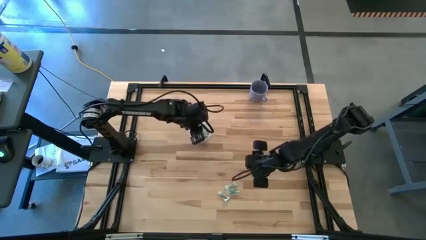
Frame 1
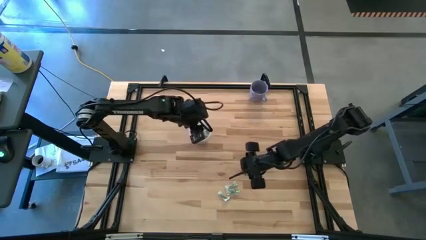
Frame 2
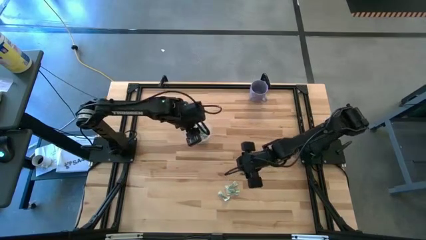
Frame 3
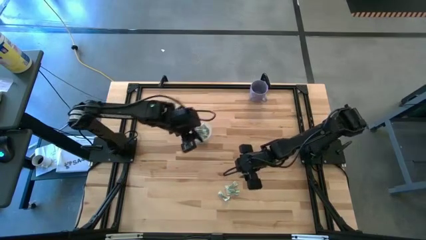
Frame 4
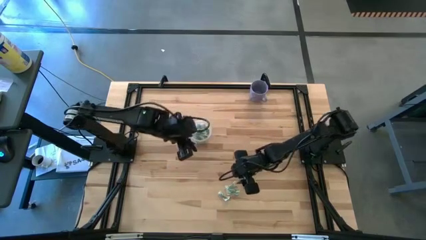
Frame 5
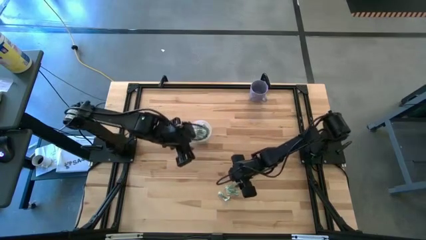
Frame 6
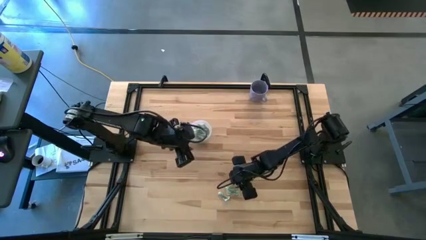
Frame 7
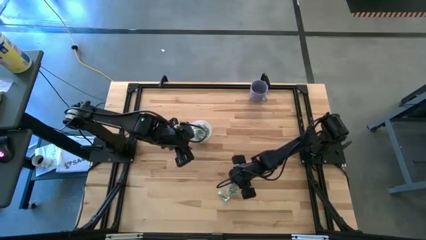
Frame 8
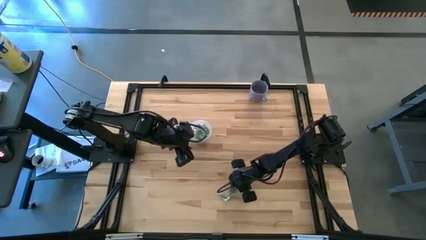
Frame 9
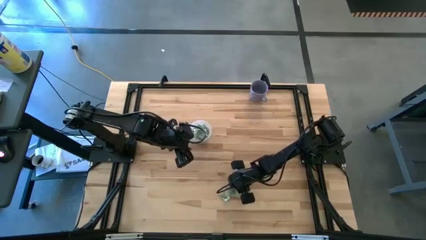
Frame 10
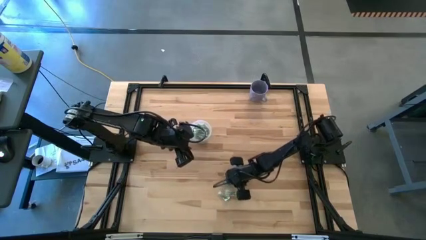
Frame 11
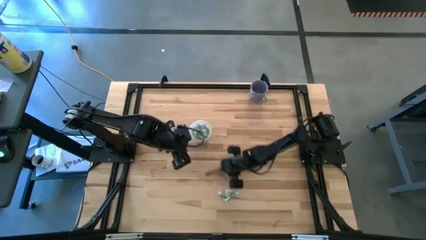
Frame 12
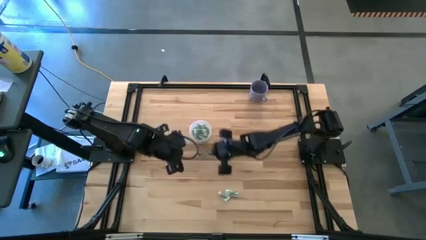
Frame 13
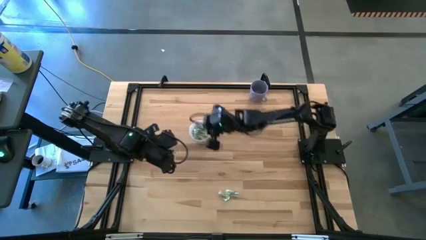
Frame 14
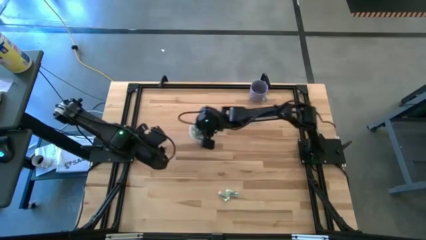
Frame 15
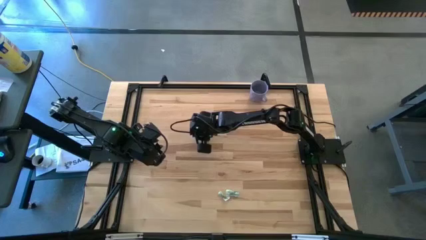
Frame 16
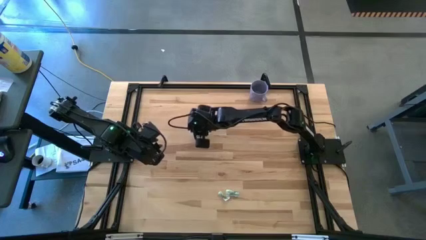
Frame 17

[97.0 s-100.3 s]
Task: Pick and place Stevia / Truvia into bins
Put the white stevia packet into the transparent container

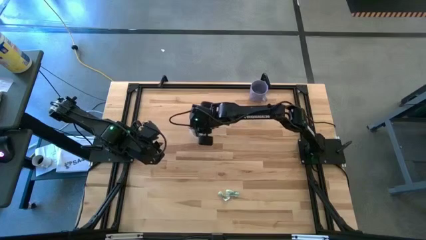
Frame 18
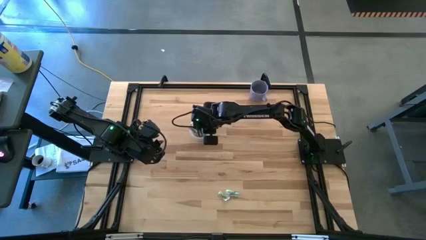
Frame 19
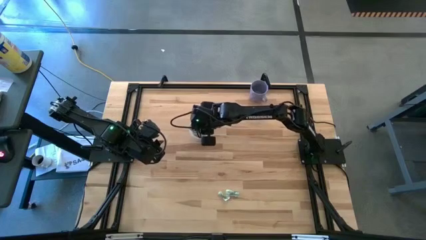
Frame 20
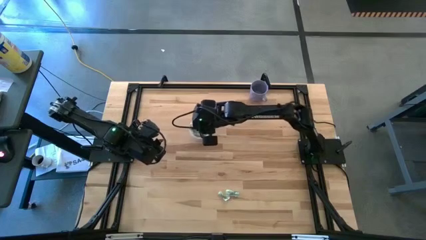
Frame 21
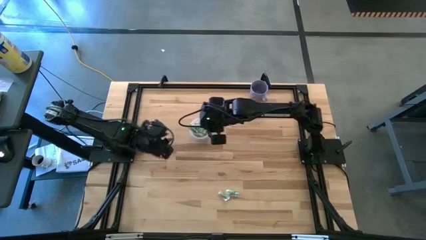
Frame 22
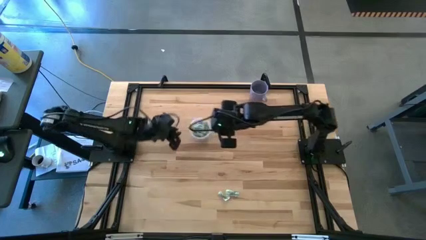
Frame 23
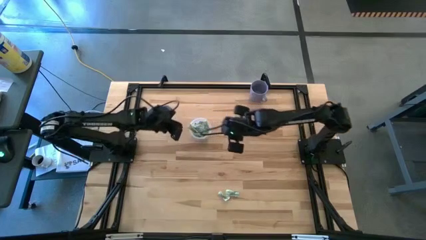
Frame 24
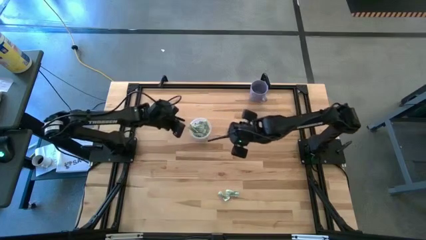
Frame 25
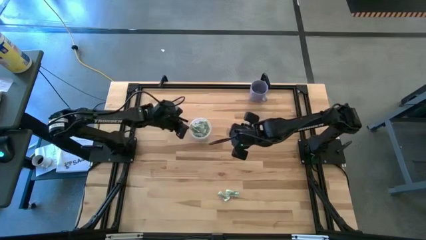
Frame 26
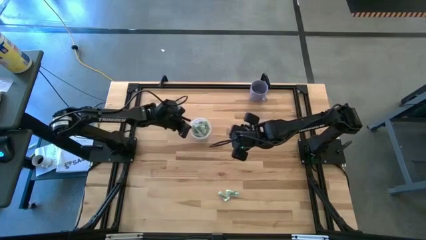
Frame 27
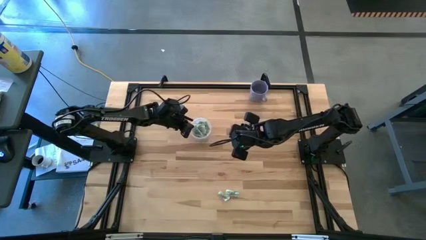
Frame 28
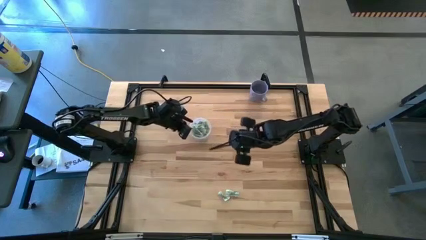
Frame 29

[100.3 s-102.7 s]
Adjust the white stevia packet in the transparent container

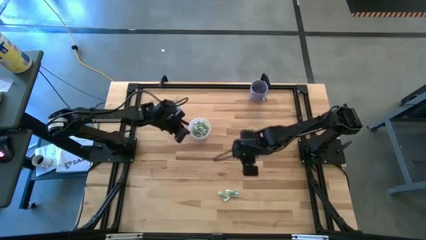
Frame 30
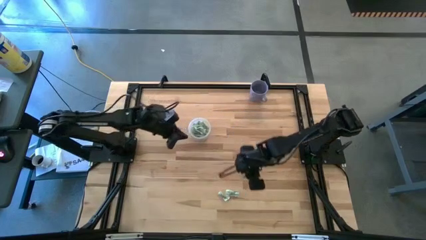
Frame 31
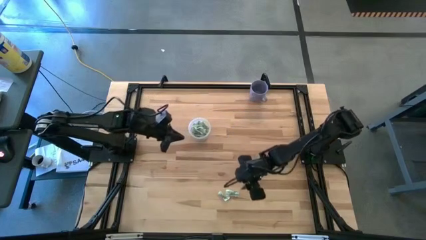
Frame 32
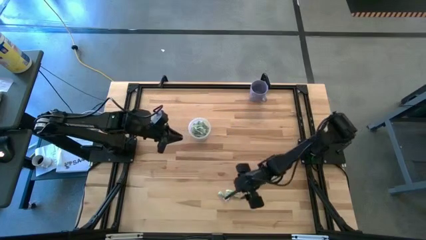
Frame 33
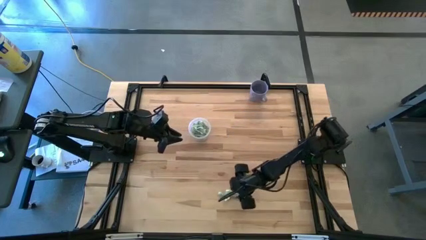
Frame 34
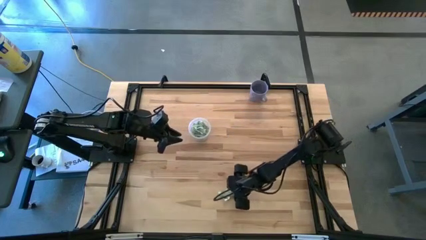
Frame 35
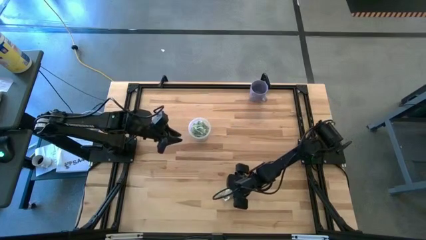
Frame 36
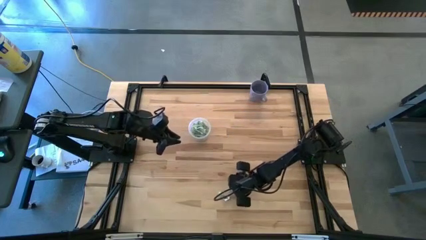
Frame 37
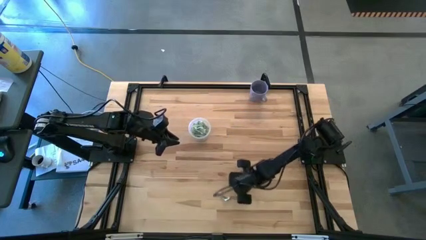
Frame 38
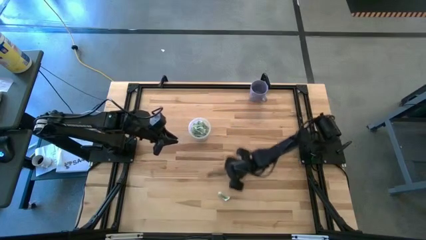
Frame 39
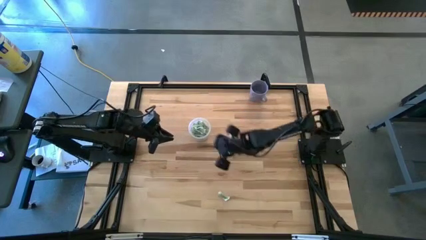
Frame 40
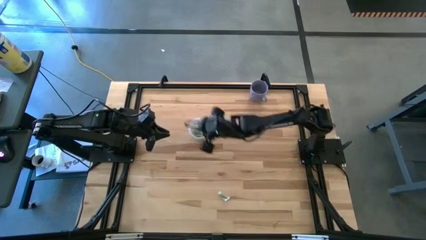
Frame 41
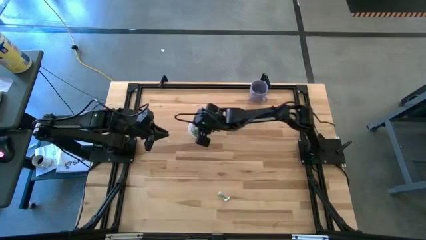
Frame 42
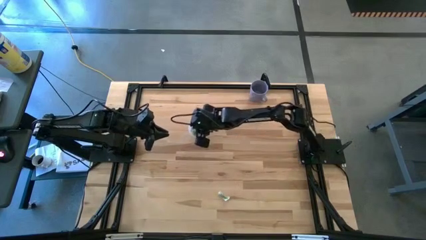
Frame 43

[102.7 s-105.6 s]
Put the white stevia packet into the transparent container

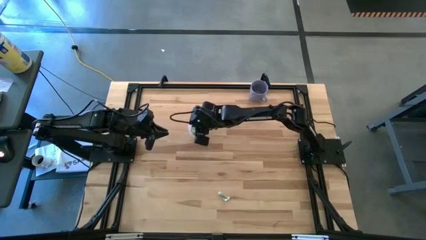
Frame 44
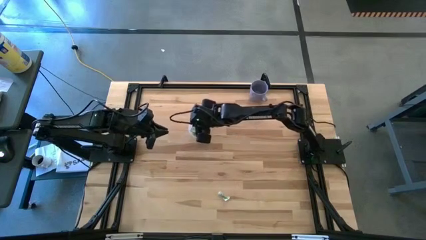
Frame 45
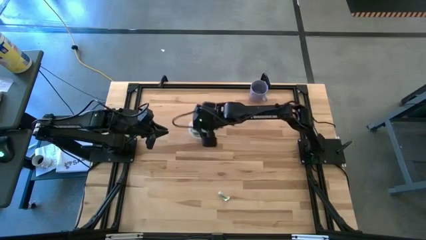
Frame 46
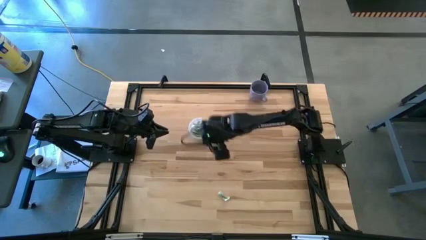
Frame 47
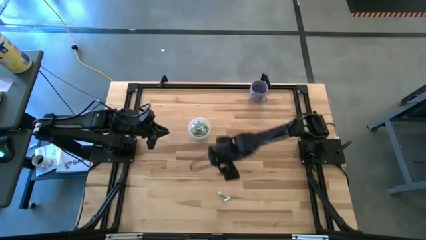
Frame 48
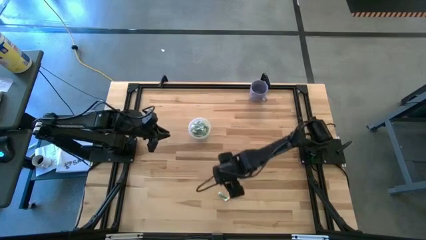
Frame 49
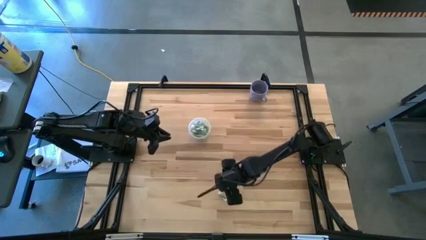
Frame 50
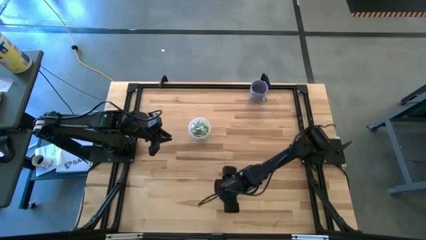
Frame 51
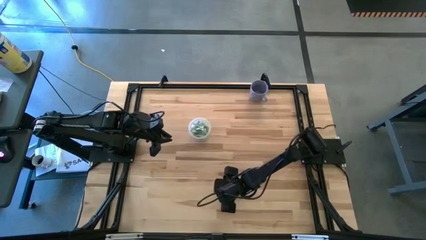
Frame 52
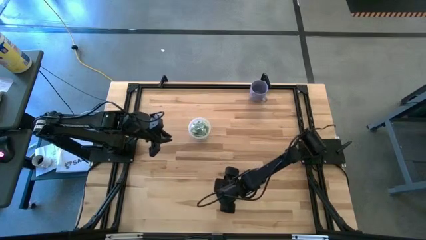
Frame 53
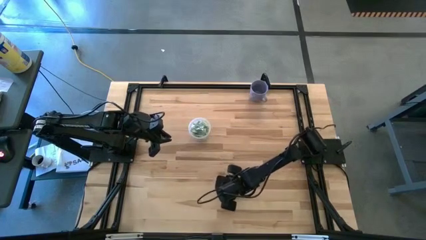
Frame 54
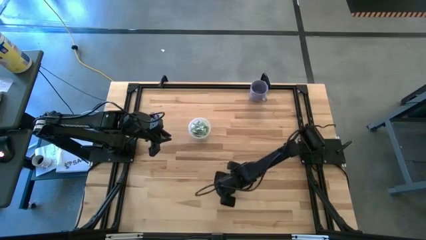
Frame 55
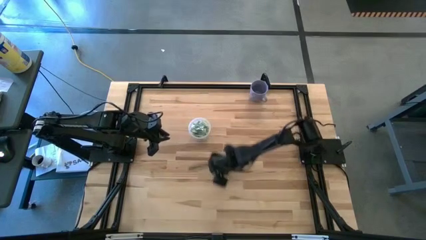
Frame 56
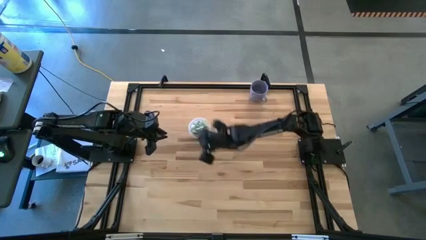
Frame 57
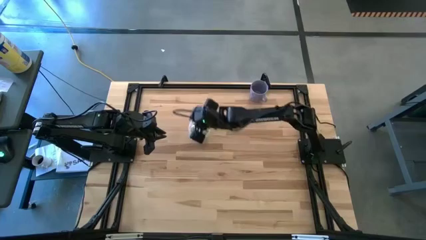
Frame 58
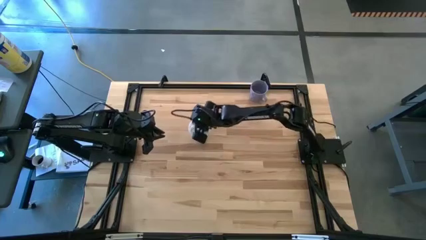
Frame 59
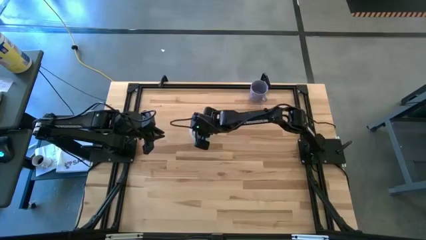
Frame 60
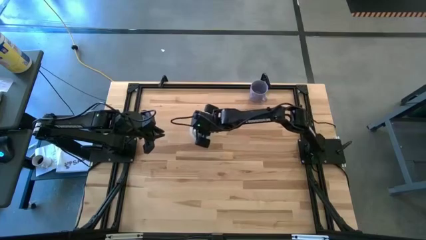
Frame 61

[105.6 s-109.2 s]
Put the white stevia packet into the transparent container

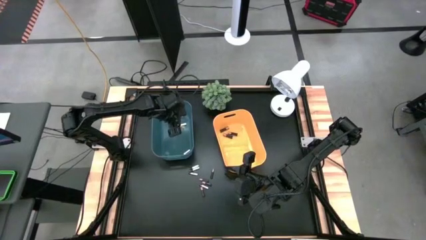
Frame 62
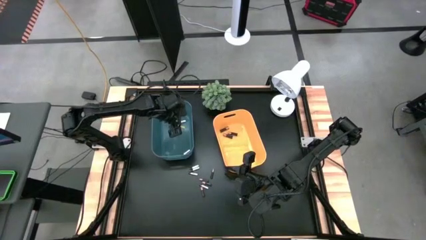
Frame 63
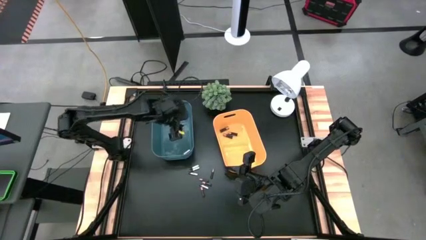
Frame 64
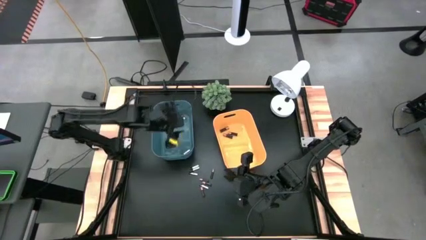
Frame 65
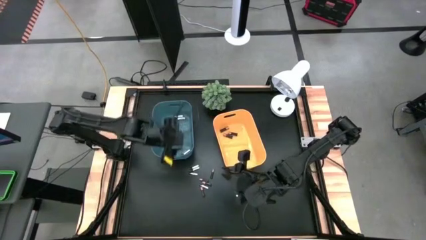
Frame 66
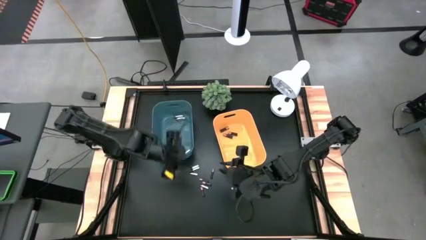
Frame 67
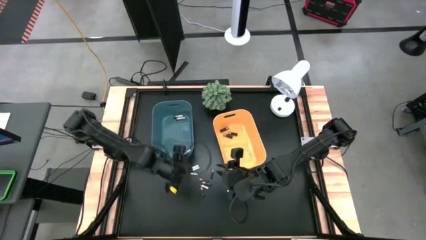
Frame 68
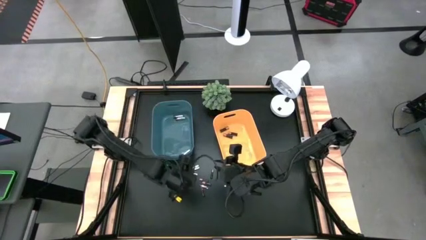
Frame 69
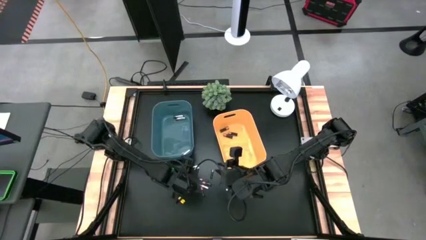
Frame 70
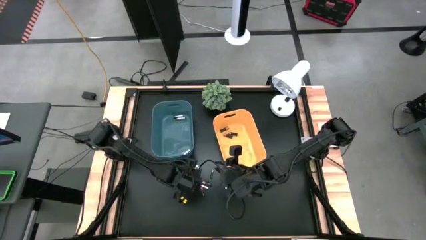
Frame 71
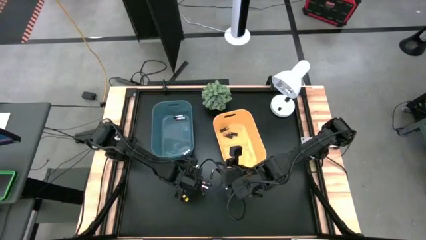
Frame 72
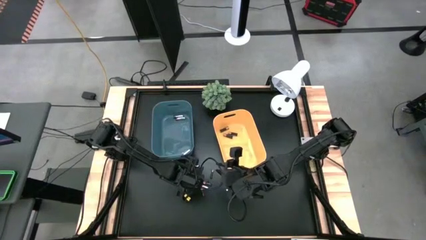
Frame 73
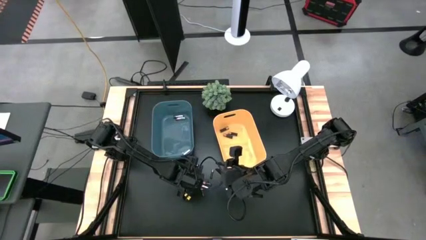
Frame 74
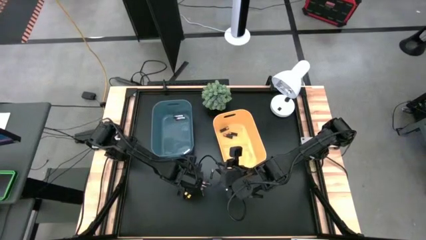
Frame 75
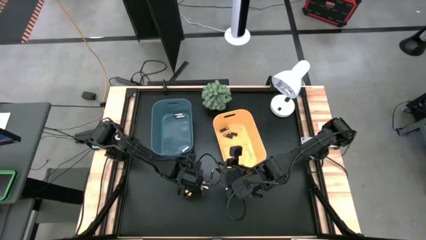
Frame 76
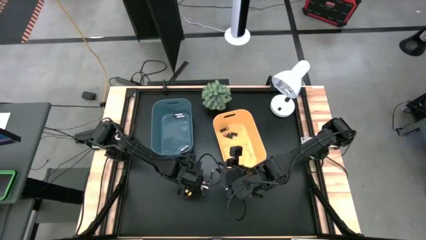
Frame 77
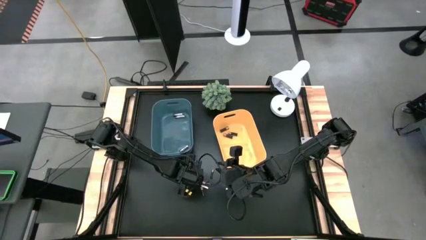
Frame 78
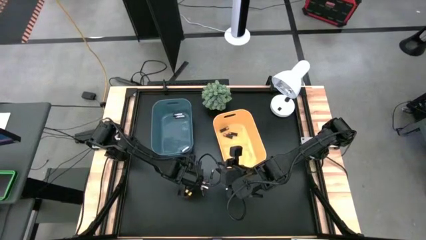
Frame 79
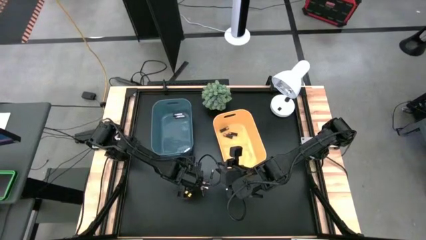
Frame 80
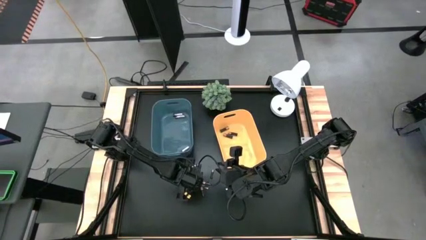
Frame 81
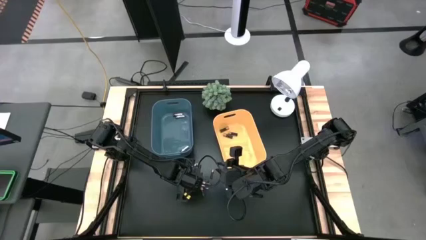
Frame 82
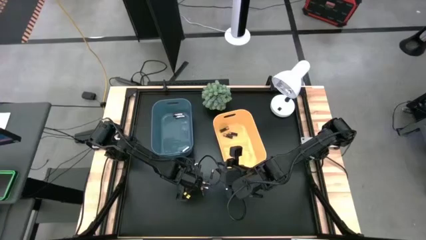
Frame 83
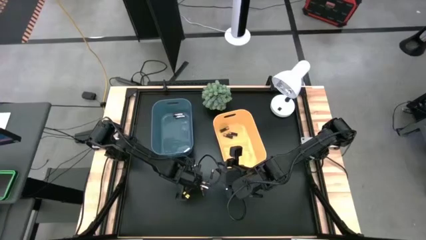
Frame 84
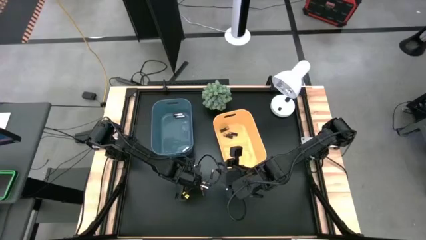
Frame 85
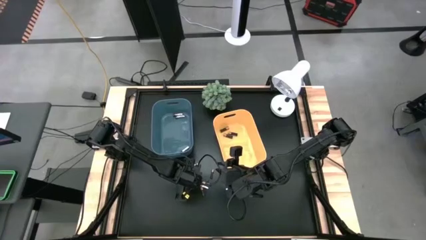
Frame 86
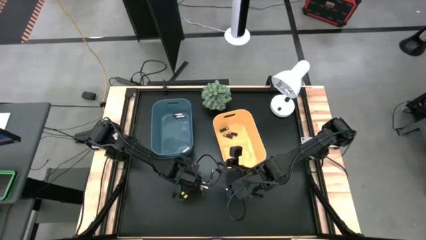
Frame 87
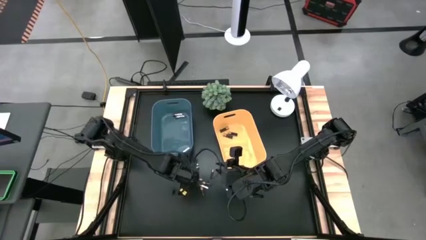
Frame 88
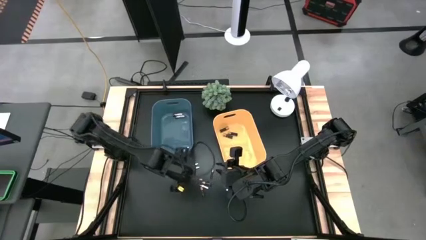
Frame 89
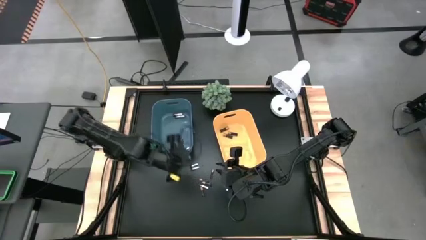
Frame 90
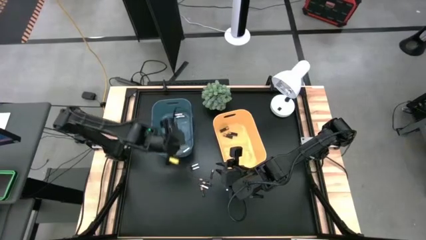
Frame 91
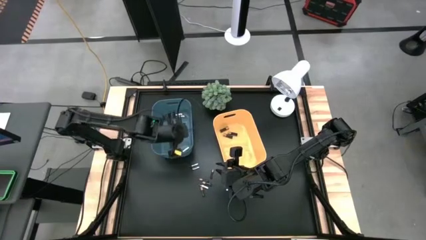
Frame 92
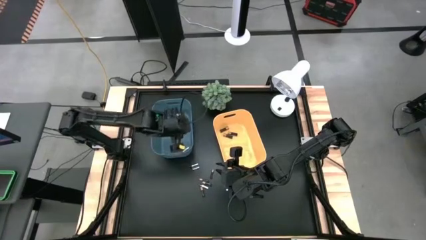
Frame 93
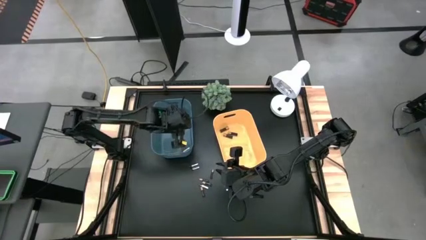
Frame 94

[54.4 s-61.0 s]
Task: Sort batteries
Put the silver battery into the blue bin
